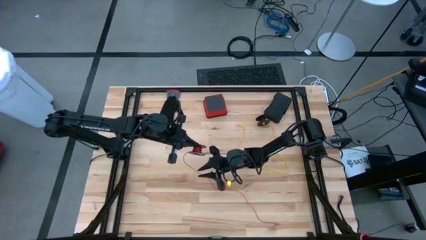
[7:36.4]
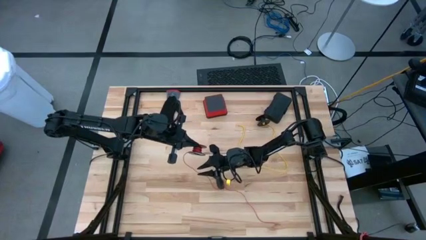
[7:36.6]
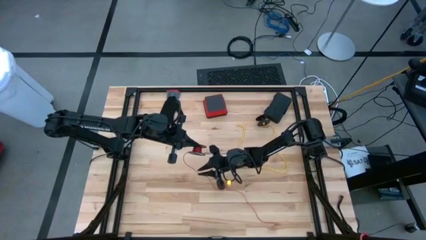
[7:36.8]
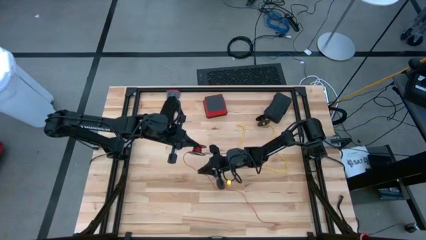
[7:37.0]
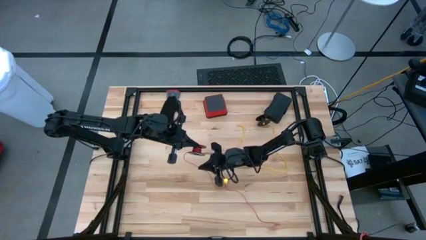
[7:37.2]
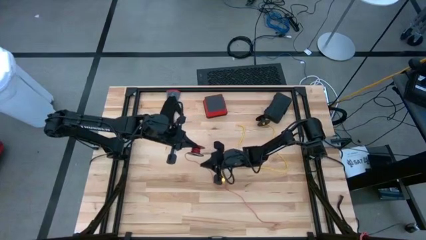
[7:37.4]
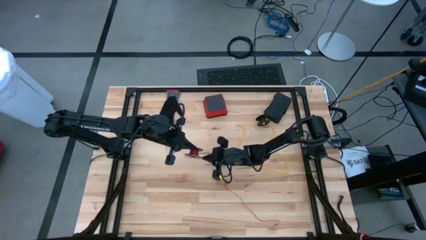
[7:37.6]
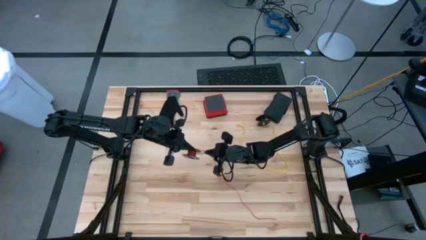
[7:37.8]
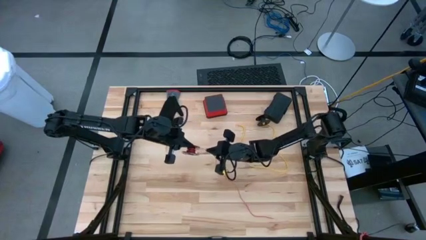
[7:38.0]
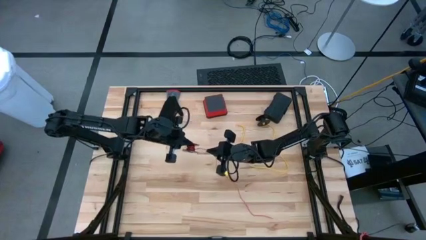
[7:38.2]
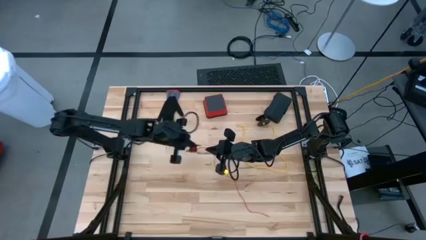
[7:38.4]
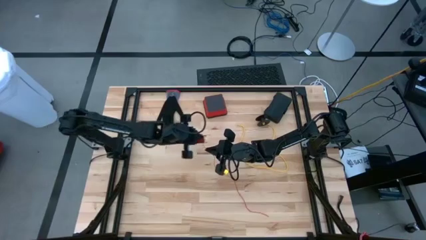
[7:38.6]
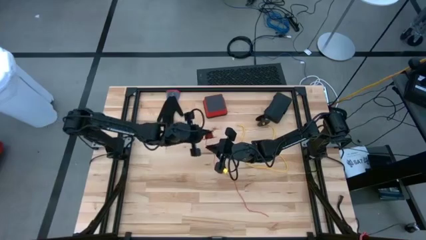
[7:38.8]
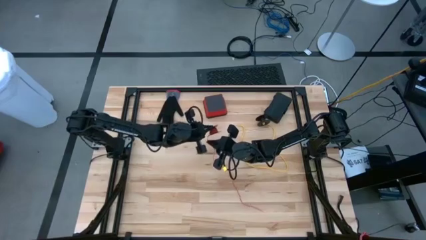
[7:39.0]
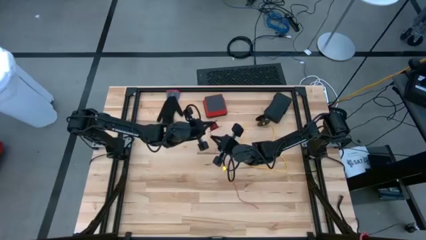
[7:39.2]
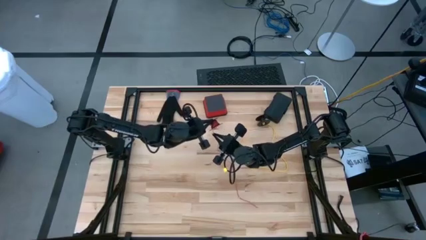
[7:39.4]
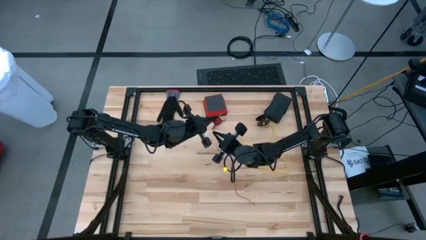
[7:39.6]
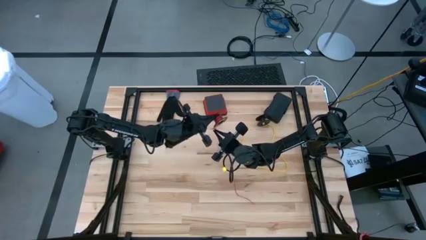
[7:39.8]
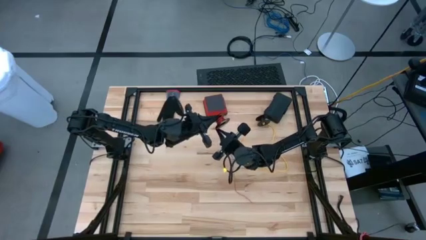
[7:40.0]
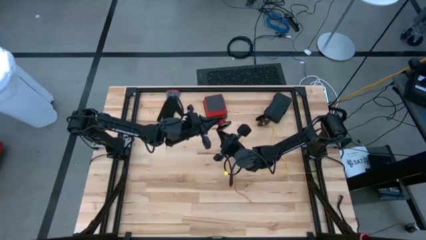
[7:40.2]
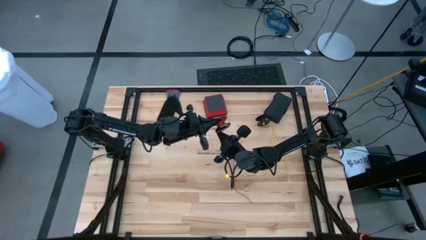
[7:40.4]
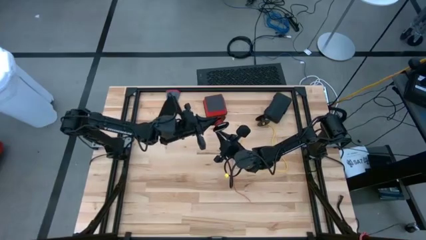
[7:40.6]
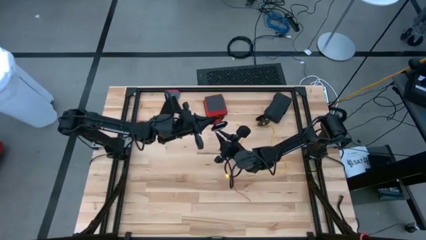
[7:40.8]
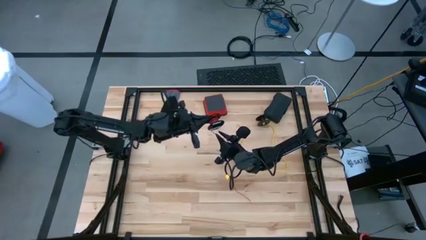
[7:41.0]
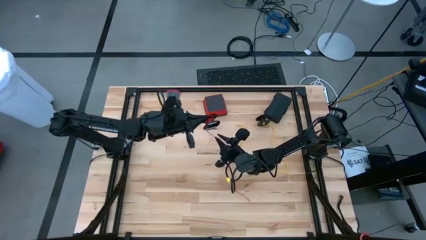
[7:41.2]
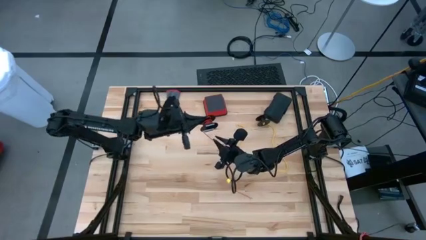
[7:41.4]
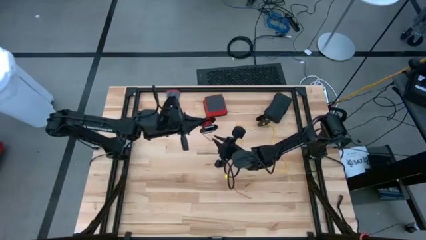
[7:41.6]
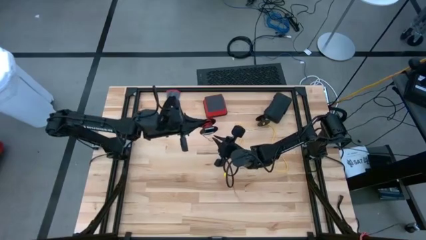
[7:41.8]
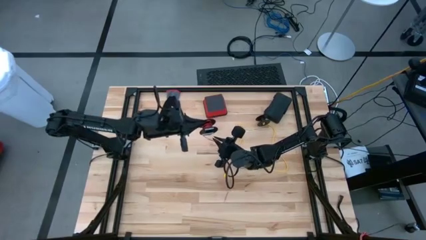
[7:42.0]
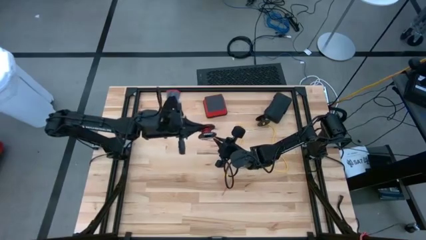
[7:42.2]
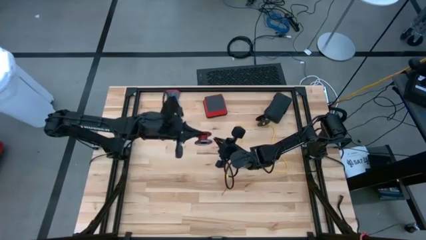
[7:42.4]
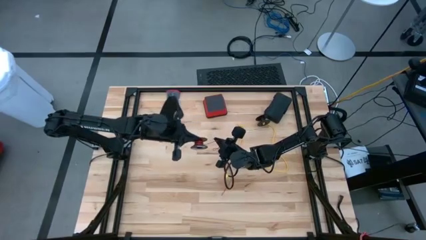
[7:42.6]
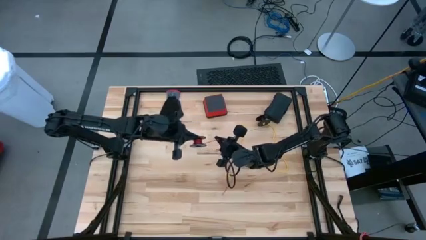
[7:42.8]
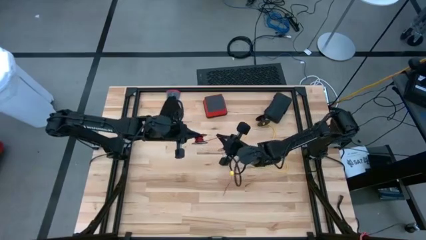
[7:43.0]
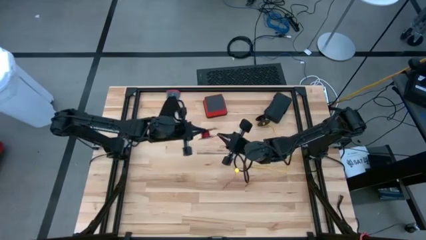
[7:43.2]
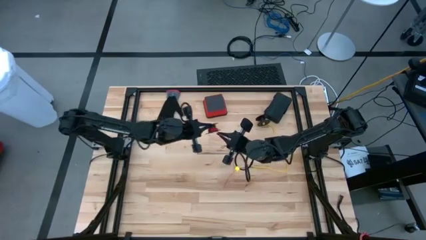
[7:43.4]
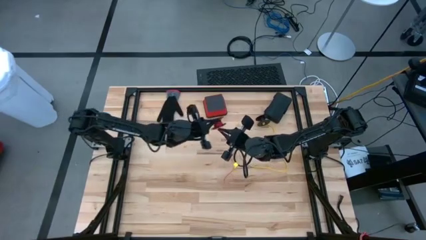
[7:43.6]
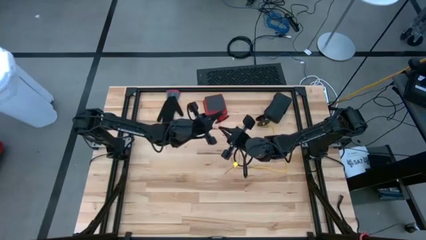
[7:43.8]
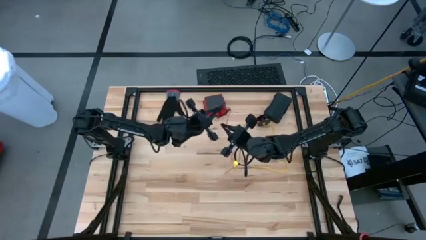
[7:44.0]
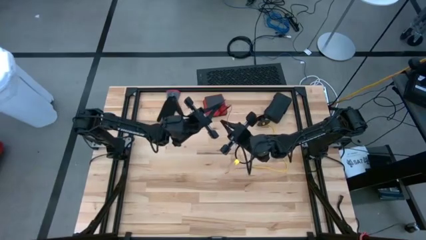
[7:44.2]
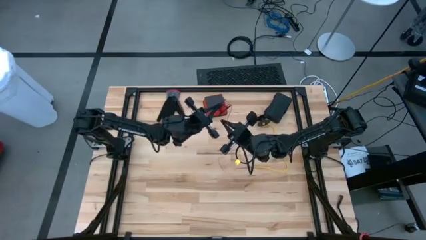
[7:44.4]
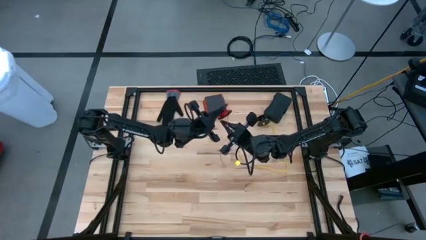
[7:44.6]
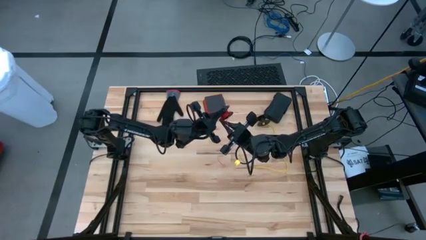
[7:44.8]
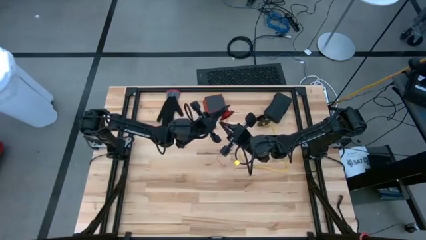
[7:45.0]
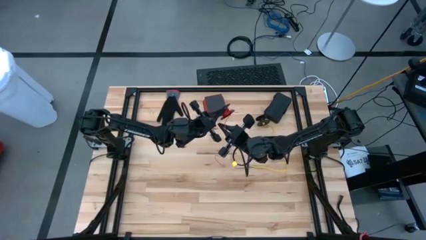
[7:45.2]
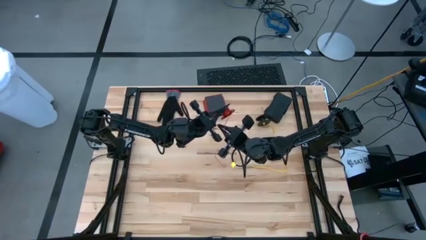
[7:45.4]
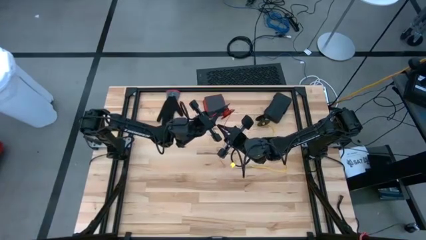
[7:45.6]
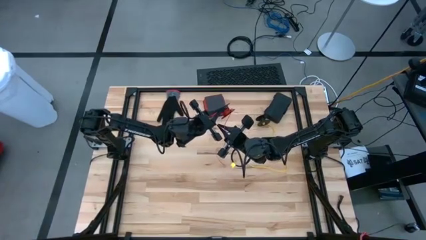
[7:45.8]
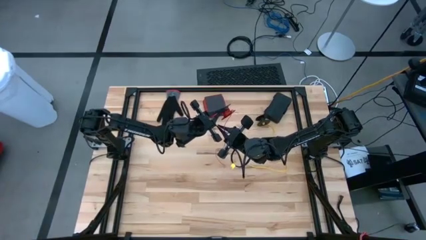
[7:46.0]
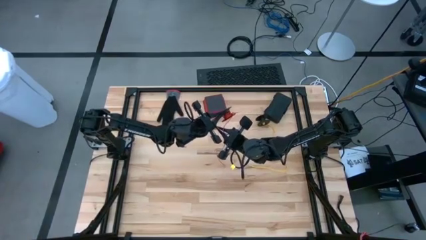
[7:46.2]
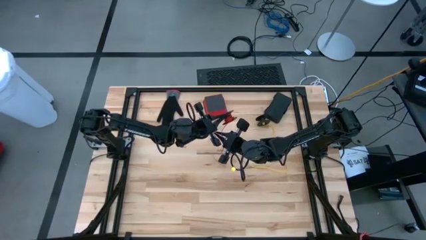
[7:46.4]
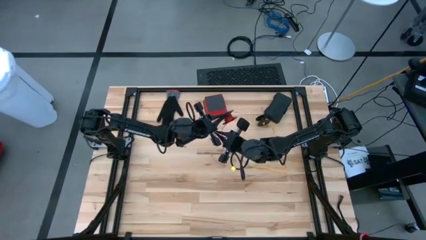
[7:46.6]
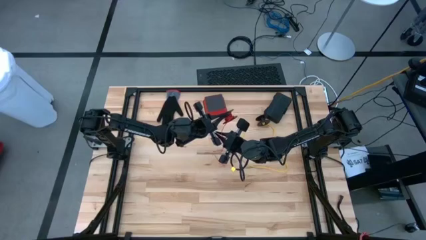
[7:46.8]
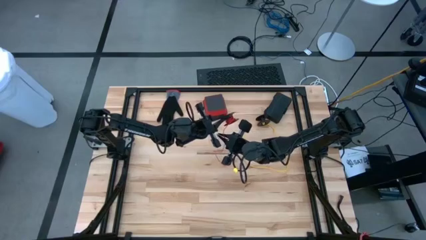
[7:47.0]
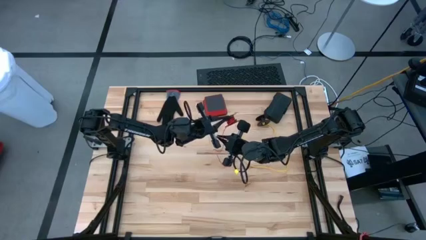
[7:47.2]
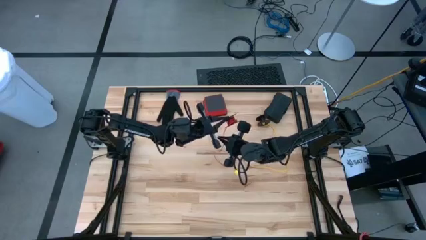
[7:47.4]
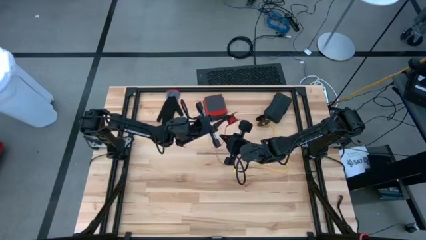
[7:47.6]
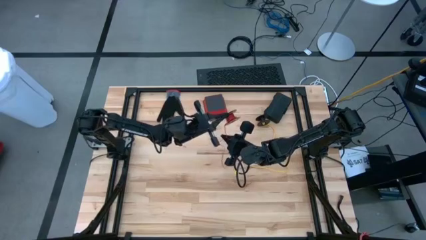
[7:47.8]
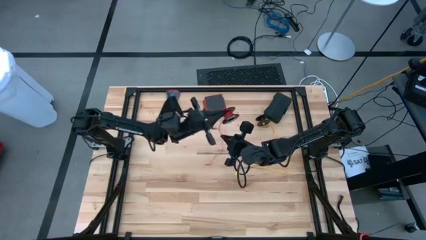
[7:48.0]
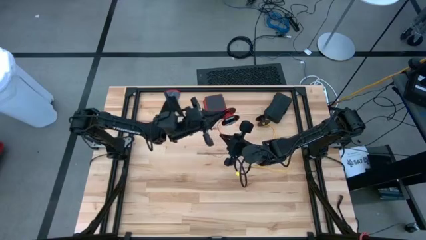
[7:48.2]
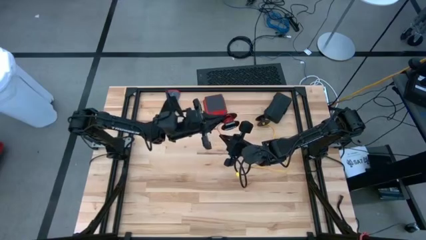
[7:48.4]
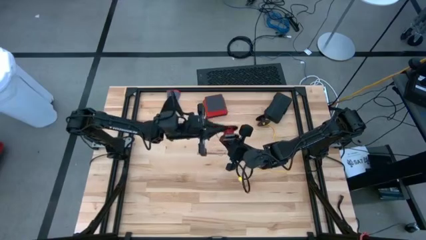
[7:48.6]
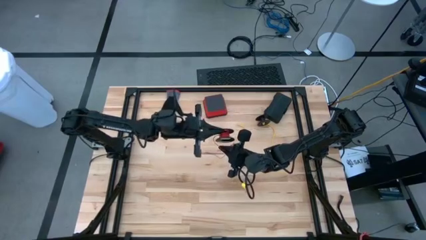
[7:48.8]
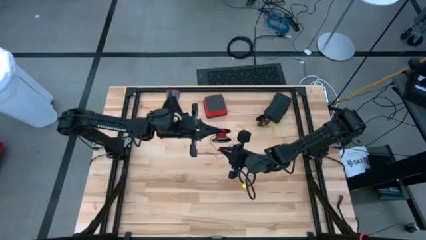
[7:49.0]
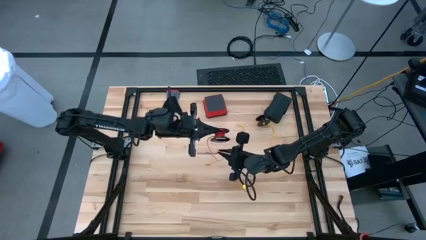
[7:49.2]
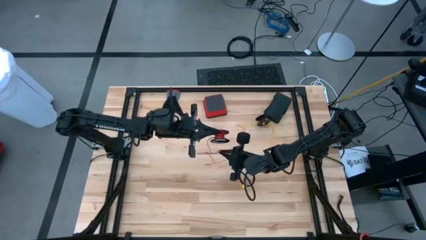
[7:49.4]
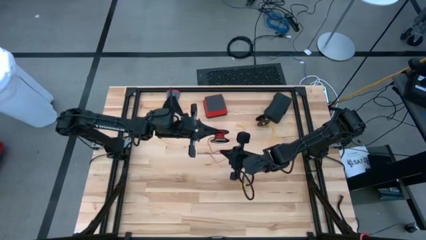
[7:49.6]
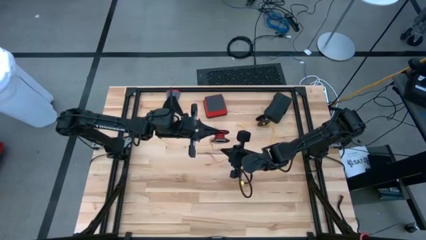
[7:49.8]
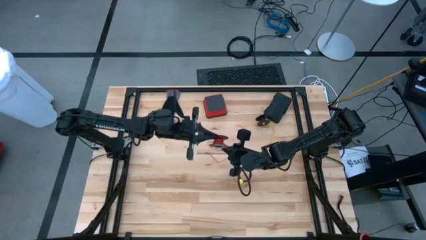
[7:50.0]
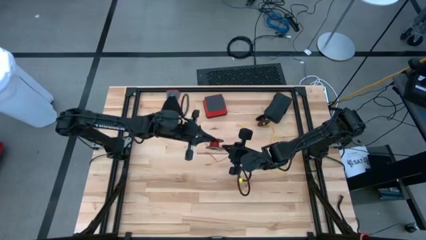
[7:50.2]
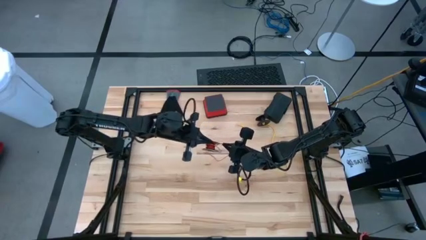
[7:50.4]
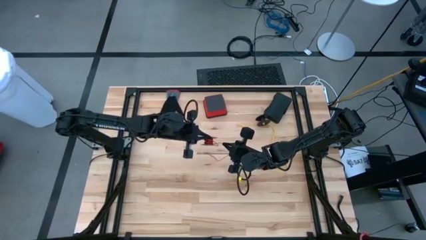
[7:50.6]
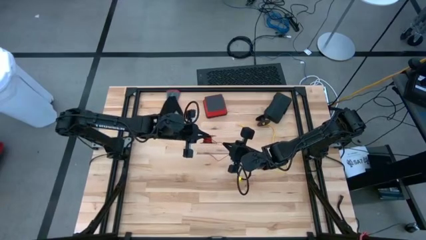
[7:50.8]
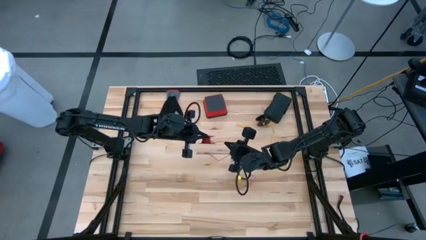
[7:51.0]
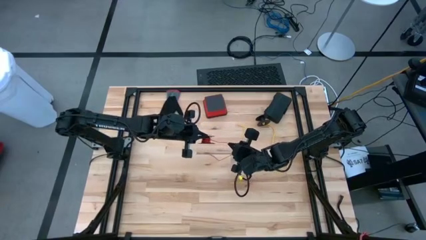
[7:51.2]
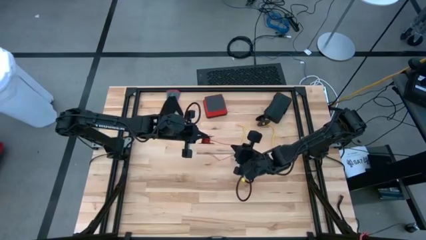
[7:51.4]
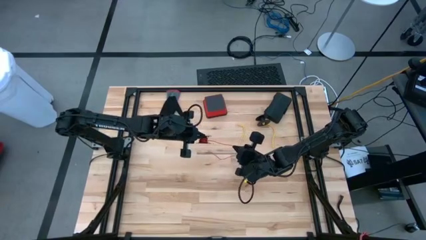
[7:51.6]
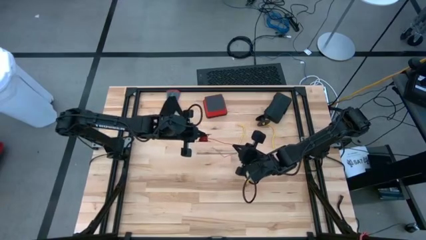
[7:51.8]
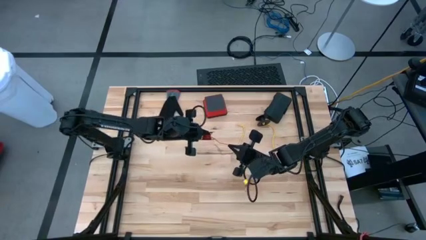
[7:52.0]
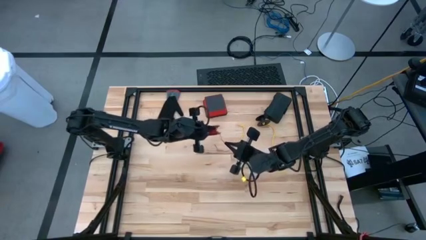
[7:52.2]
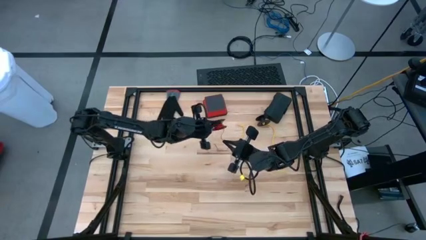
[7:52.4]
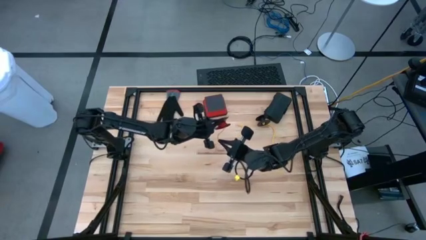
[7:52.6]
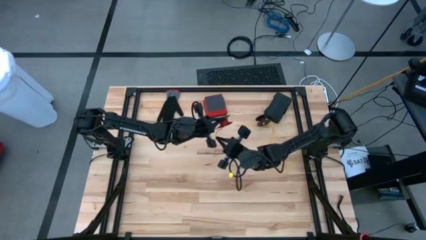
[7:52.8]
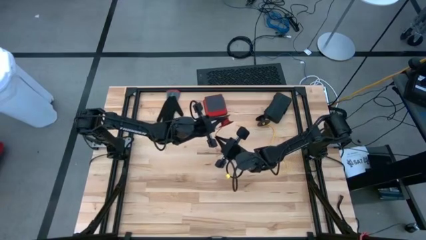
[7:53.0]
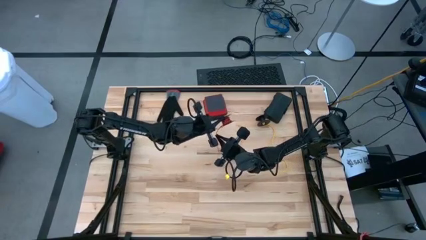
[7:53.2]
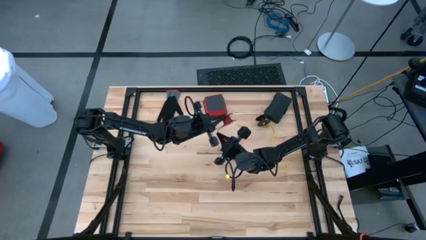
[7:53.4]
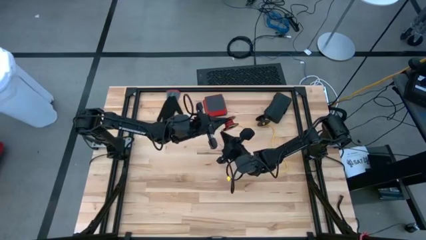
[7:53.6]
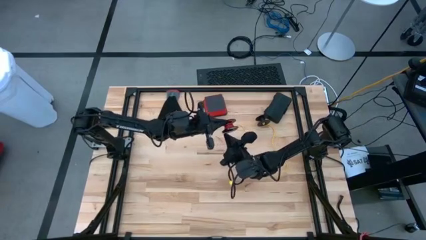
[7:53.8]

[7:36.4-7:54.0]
Task: Coil cords
Coil the red wire onto the spool
